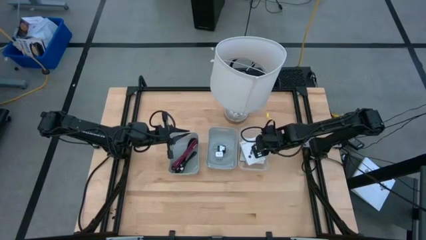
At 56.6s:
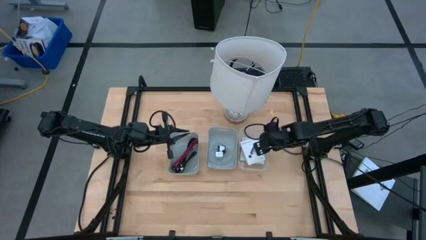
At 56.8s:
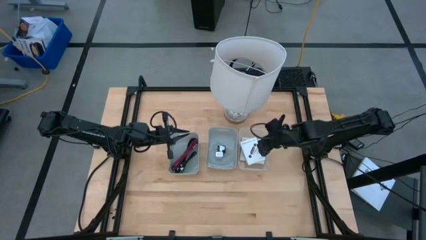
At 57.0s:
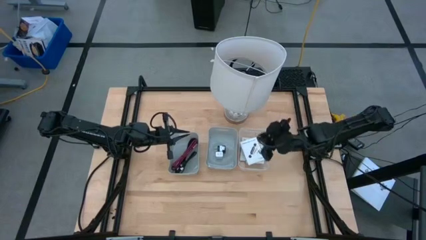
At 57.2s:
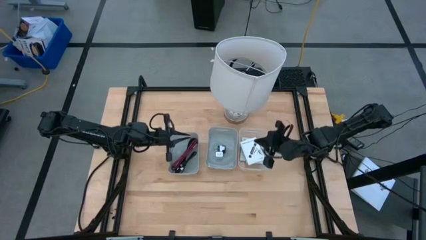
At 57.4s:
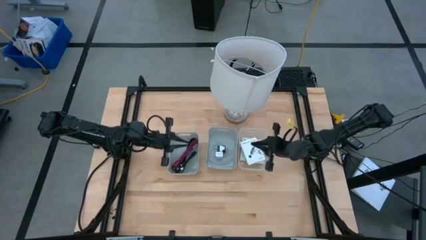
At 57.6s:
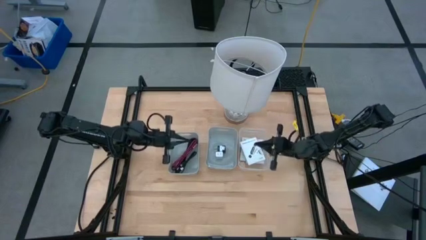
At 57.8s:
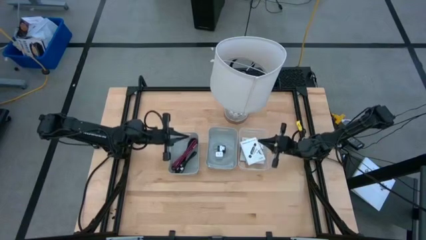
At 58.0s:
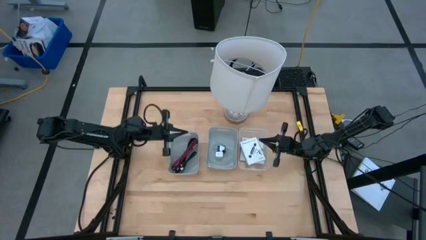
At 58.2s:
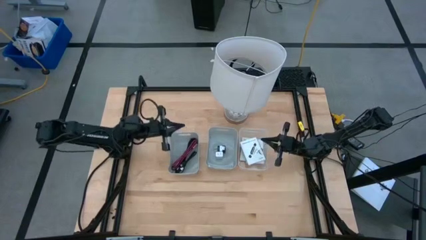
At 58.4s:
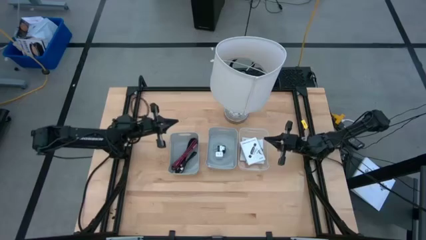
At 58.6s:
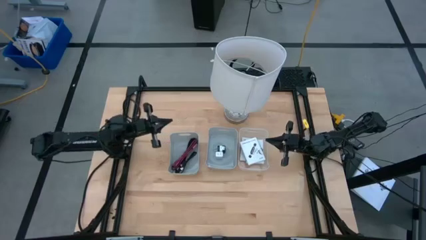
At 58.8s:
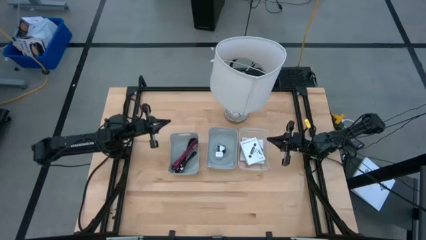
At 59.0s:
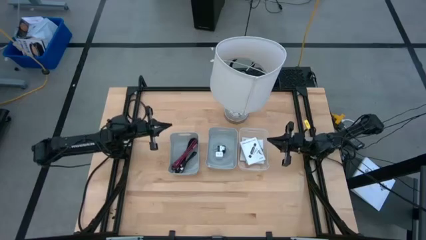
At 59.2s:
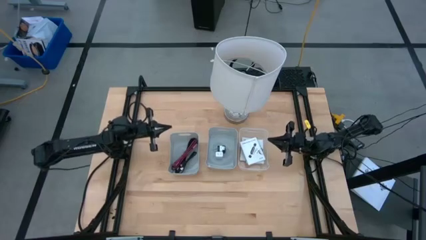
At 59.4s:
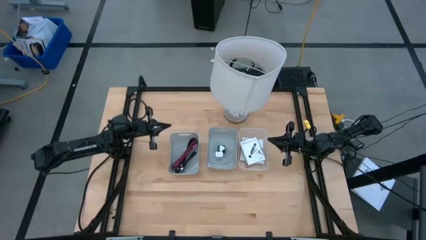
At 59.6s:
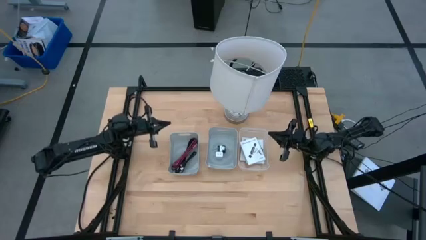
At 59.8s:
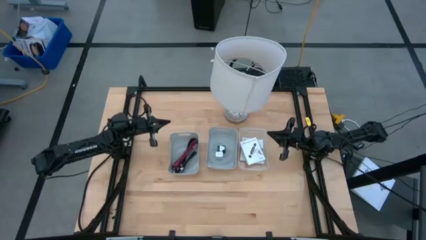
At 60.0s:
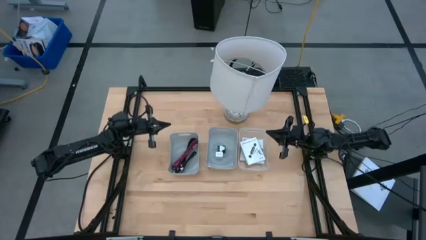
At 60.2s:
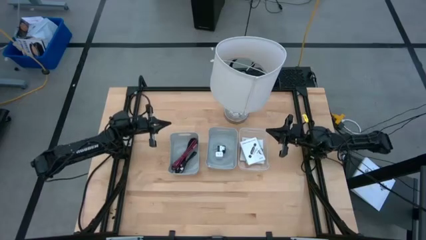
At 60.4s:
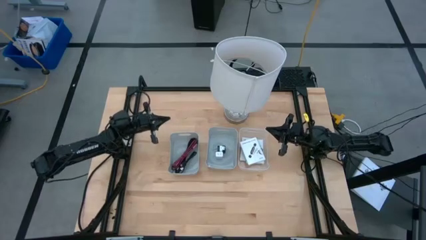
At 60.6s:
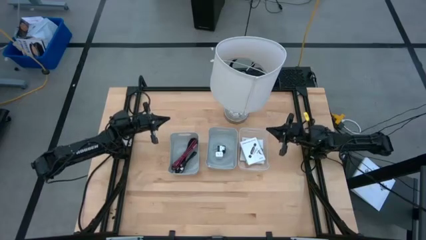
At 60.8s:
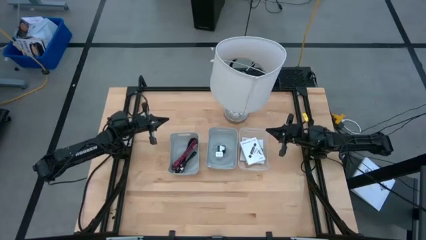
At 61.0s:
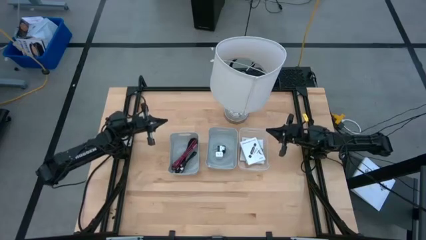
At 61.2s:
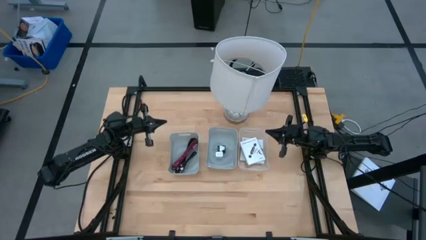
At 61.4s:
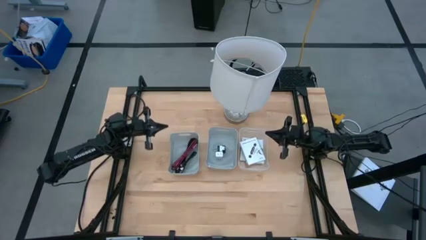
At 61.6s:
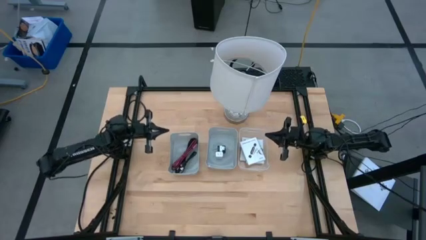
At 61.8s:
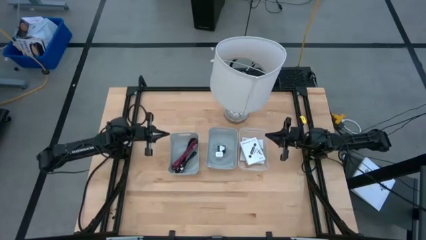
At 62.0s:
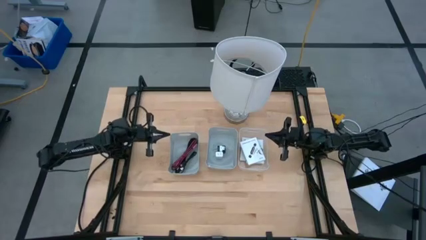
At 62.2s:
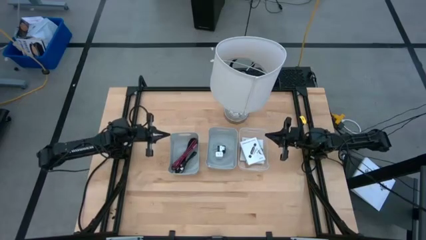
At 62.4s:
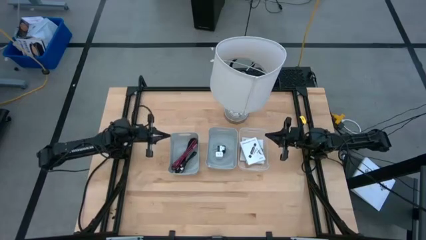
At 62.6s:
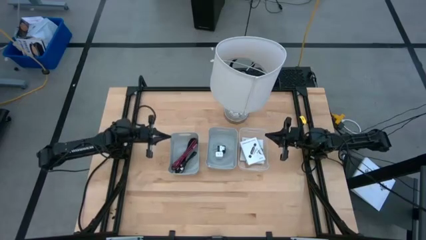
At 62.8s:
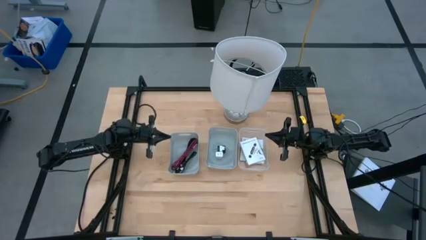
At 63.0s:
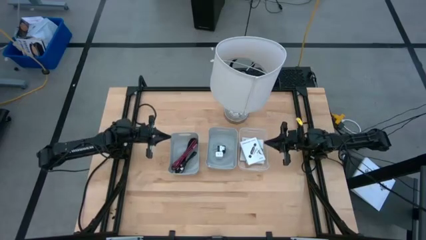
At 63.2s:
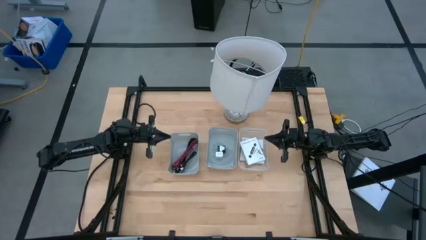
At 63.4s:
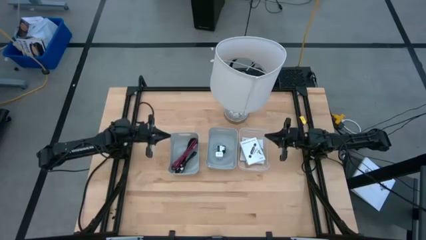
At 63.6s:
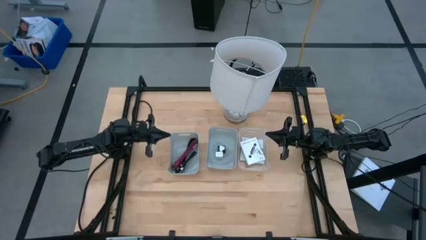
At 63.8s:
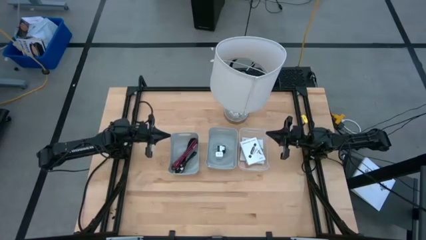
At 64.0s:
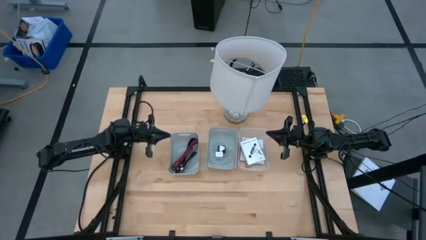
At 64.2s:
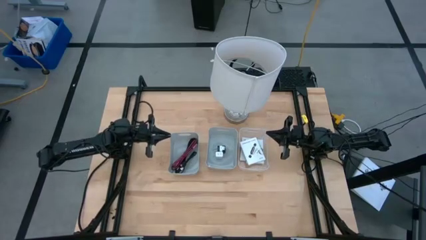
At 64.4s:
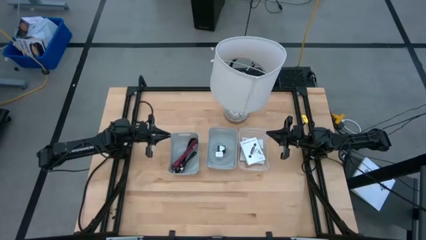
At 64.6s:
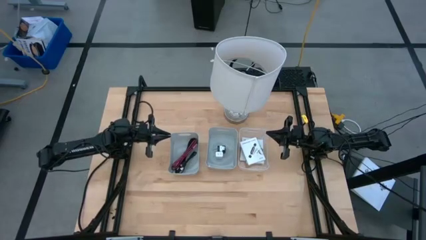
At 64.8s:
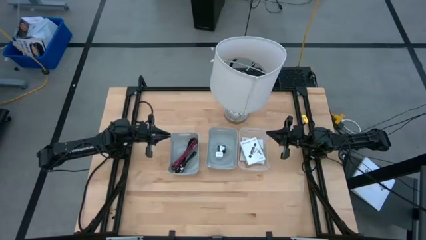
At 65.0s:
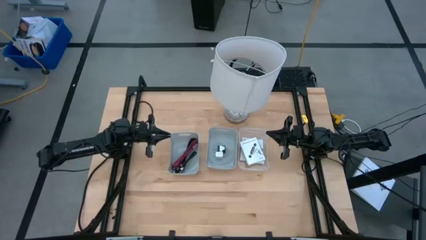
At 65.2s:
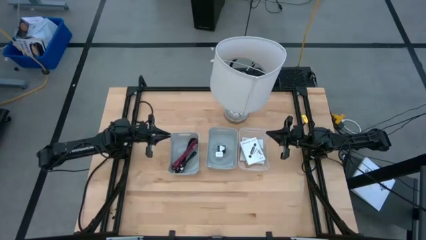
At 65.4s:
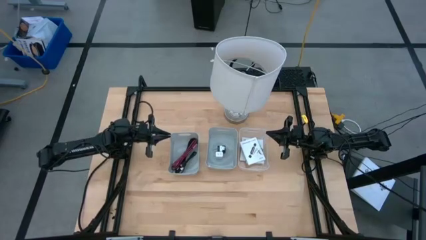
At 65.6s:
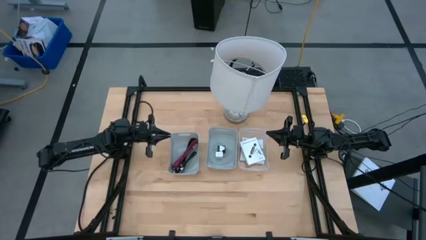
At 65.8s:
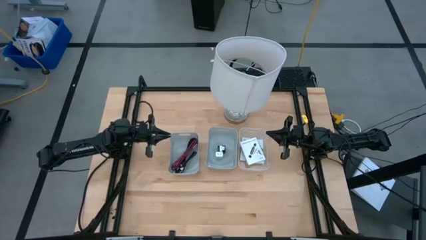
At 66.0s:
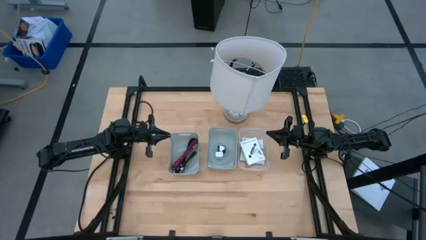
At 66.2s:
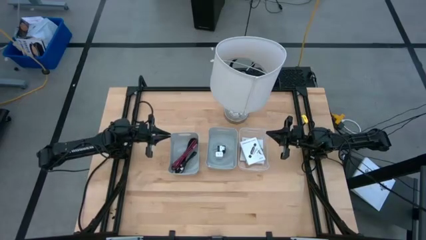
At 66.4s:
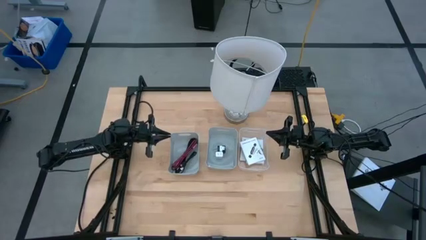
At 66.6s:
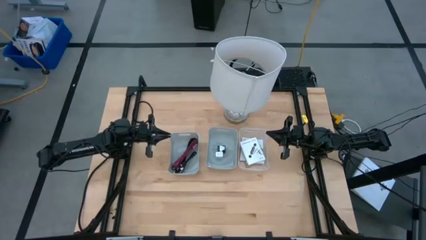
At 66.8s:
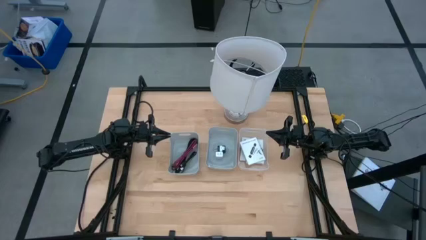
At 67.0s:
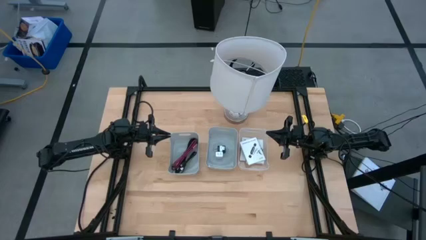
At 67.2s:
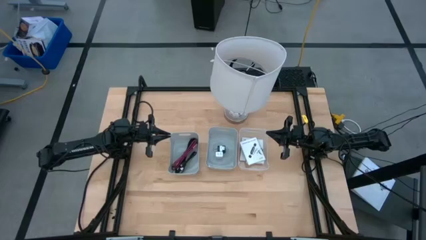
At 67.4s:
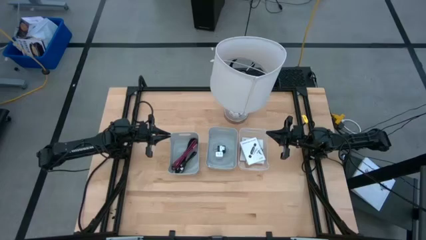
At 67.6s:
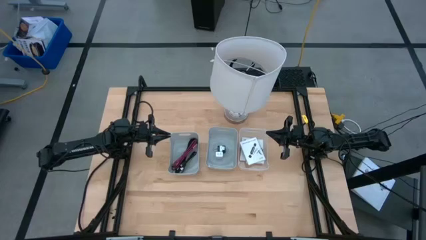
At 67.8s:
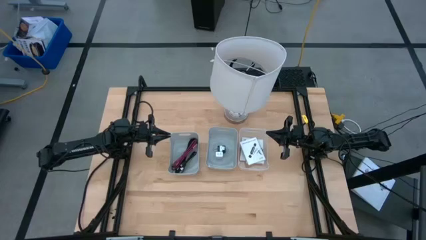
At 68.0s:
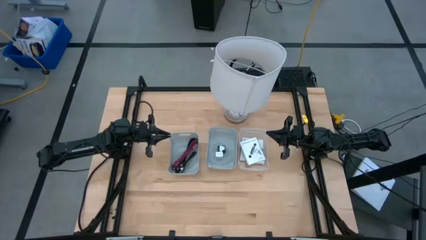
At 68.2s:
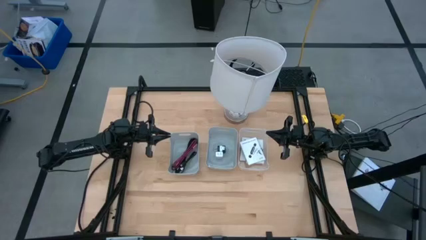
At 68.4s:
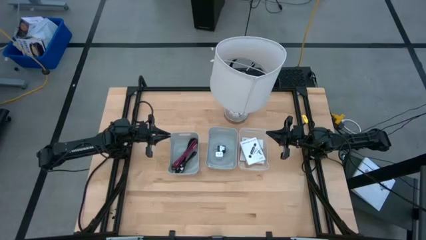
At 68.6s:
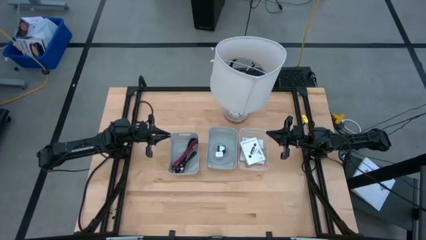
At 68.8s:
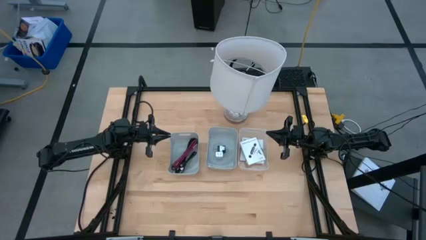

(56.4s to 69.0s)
Task: Pick and place items into bin
Return to Home Position

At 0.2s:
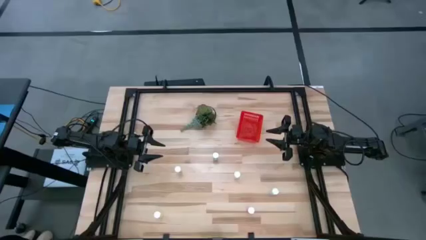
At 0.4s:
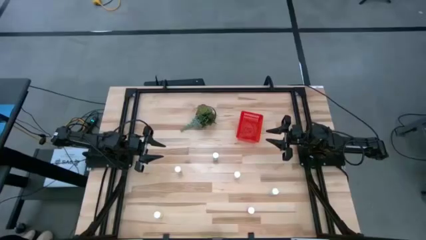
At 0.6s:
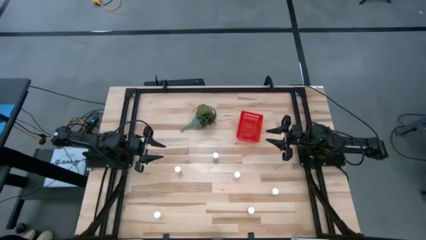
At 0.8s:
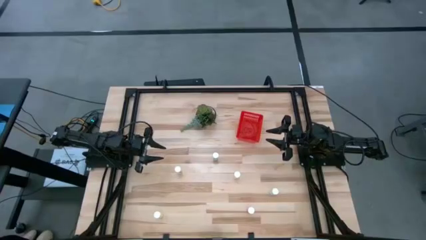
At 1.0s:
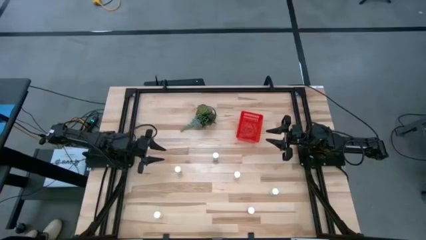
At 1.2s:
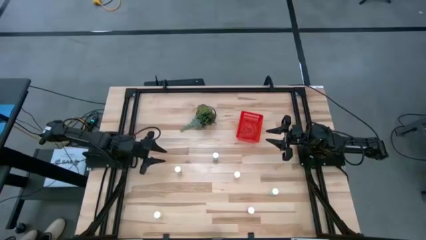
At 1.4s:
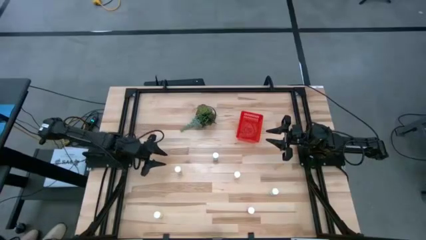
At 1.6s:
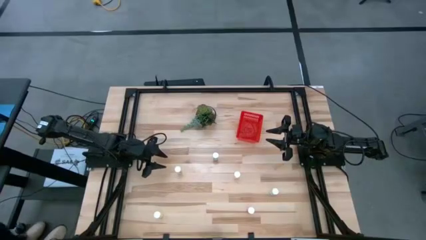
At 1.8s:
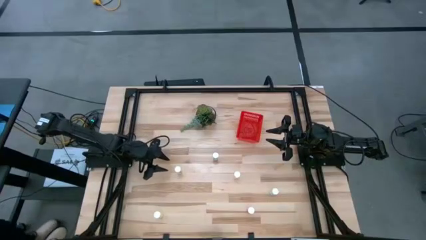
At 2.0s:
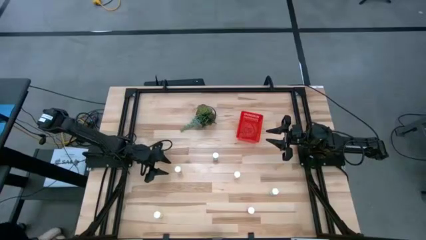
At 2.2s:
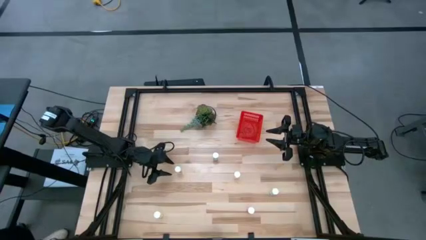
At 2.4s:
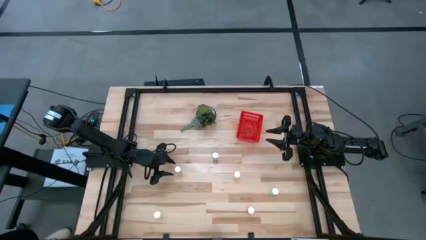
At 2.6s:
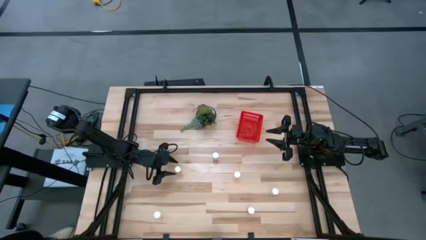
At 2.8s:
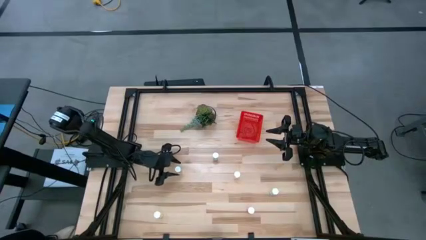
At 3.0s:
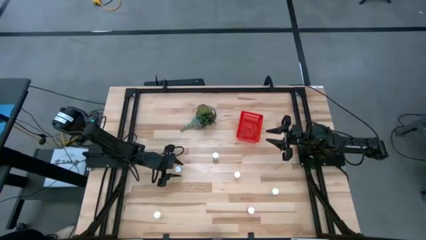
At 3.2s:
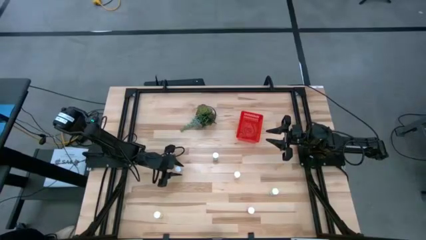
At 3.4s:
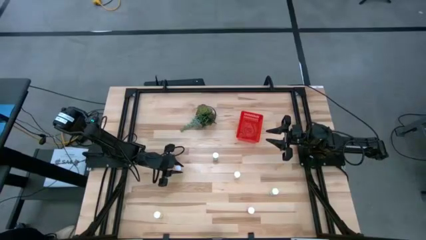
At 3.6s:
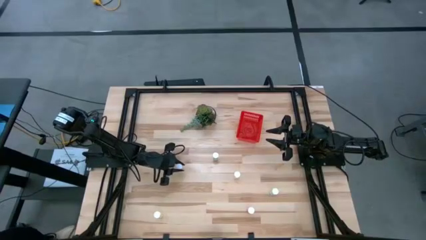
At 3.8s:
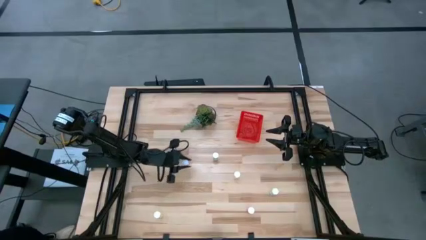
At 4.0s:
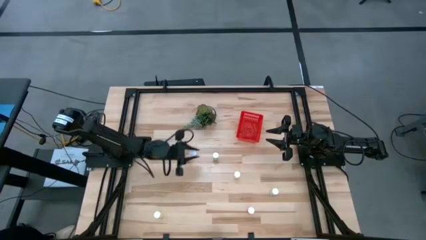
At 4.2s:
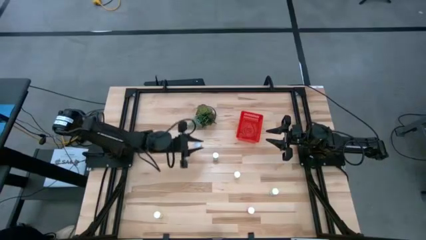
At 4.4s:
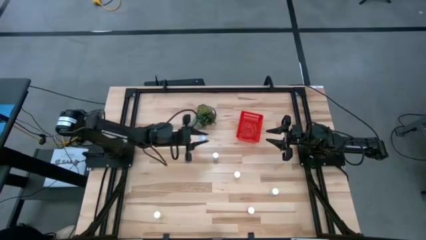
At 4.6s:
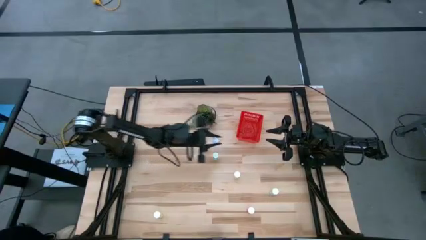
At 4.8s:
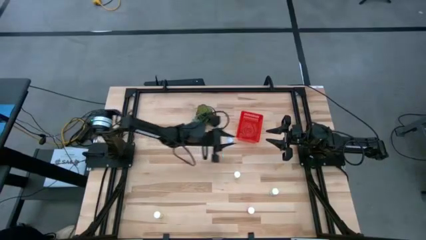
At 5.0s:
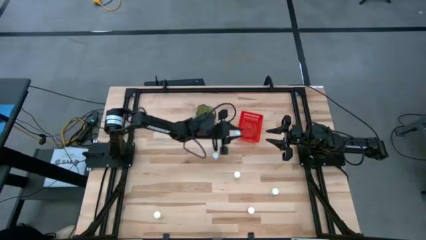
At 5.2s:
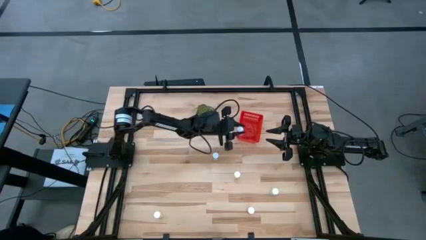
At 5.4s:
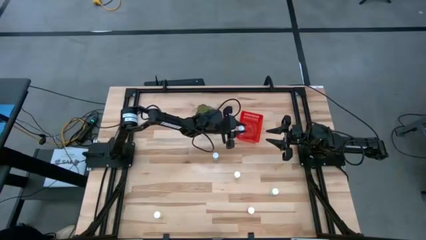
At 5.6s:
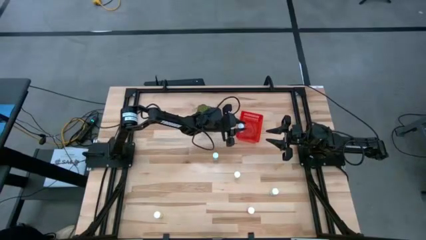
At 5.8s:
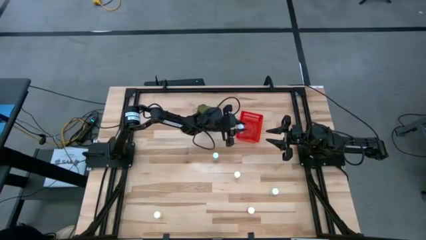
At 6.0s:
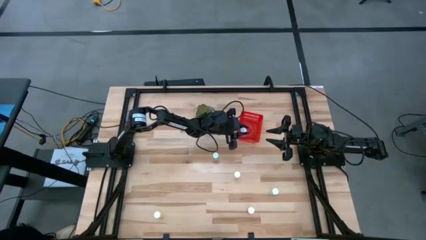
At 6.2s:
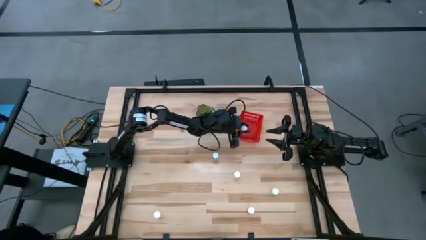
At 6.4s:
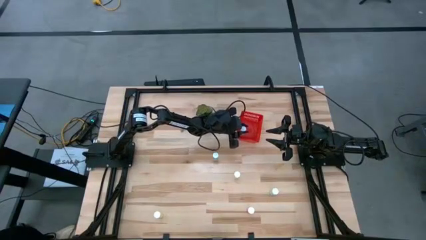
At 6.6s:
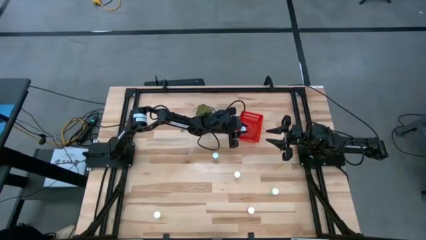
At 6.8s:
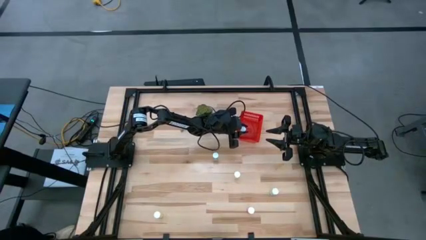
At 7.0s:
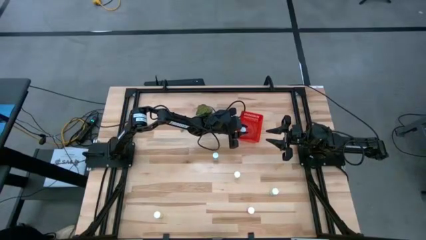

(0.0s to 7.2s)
Task: Pick and place pill bottles into a basket
Put the top left yellow pill bottle into the red basket
